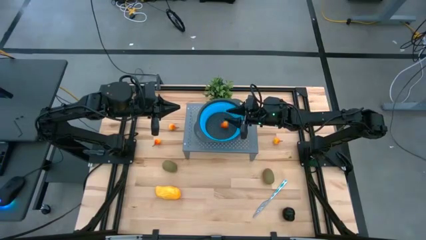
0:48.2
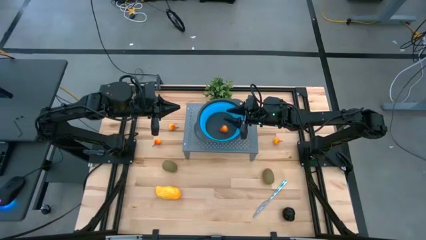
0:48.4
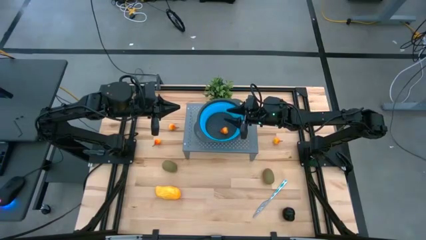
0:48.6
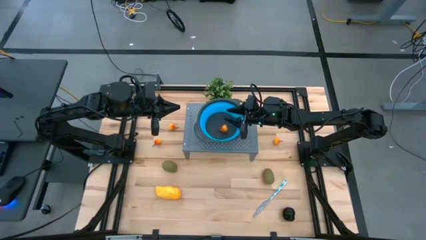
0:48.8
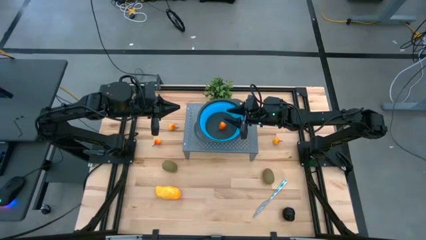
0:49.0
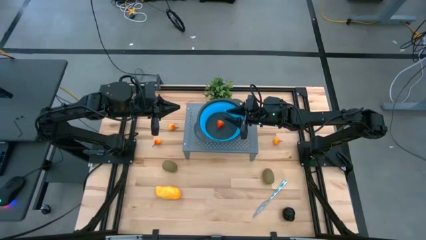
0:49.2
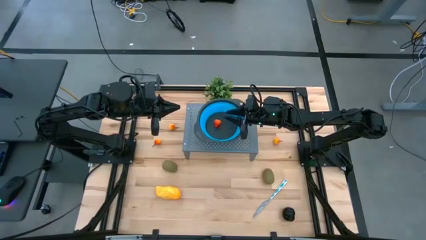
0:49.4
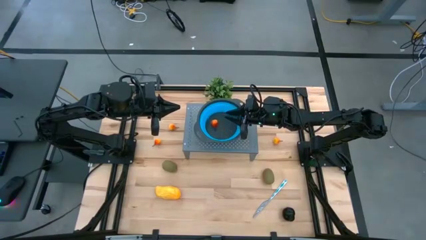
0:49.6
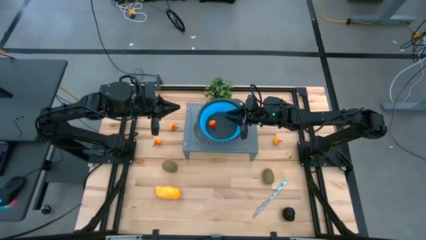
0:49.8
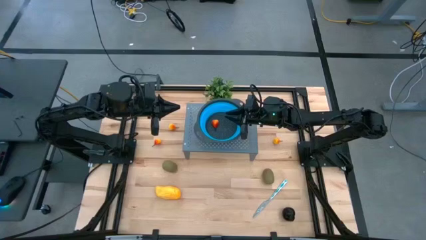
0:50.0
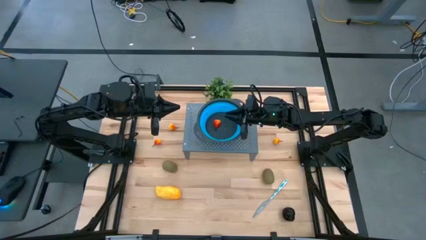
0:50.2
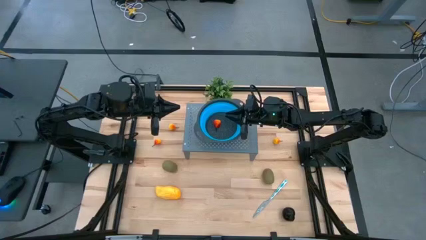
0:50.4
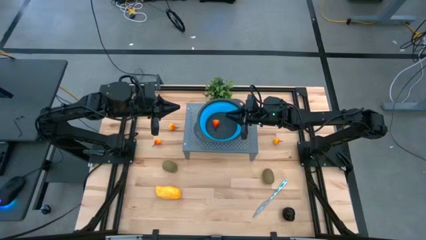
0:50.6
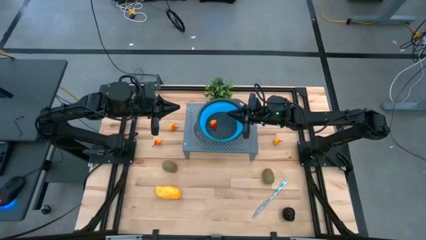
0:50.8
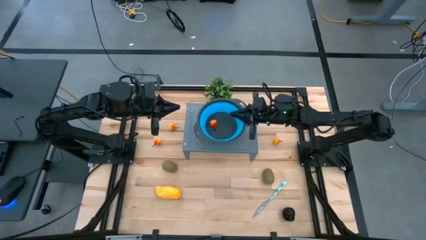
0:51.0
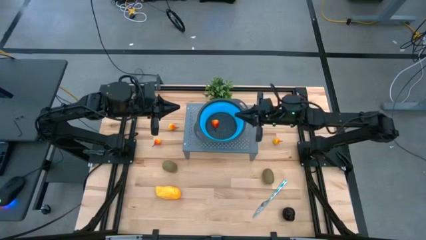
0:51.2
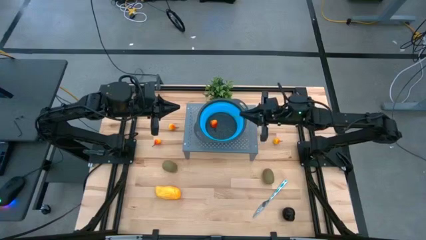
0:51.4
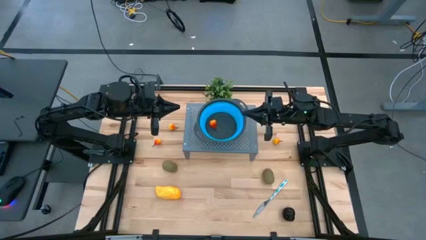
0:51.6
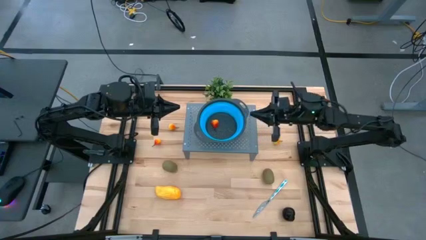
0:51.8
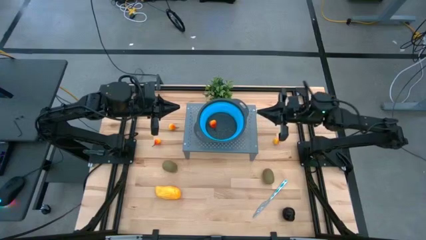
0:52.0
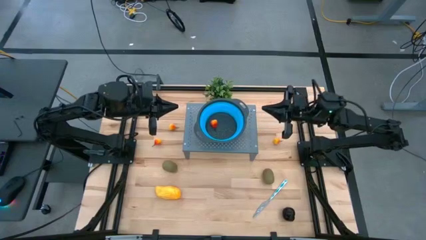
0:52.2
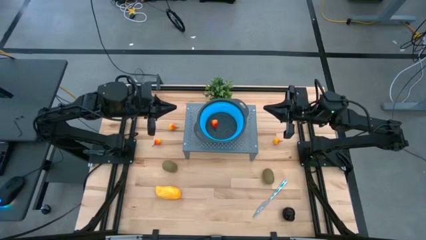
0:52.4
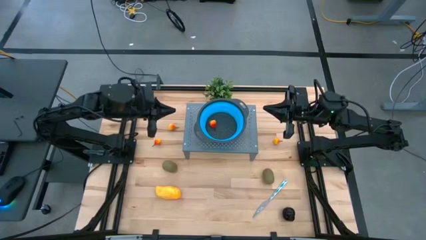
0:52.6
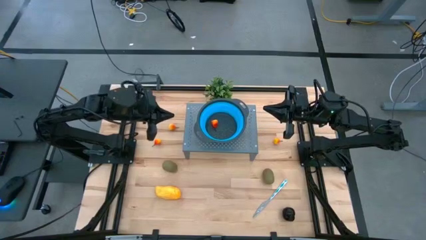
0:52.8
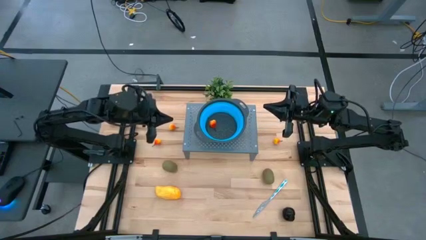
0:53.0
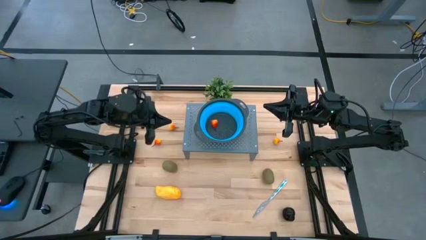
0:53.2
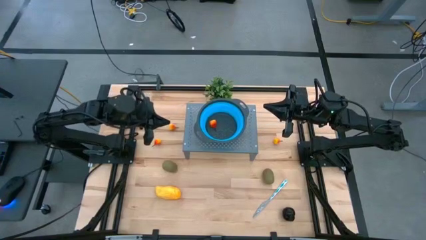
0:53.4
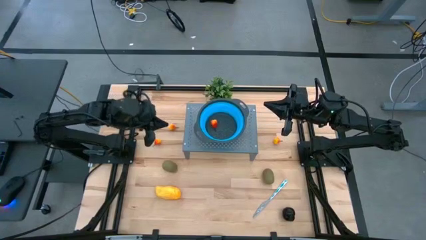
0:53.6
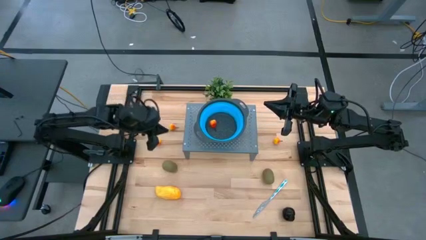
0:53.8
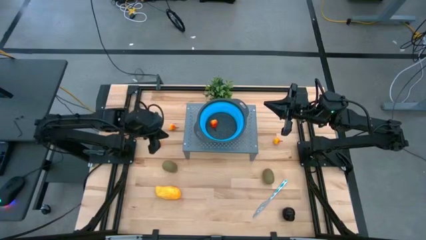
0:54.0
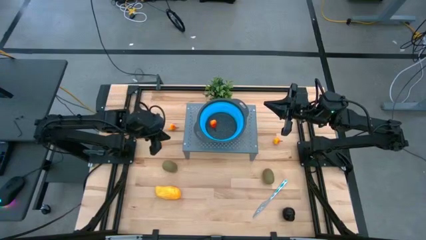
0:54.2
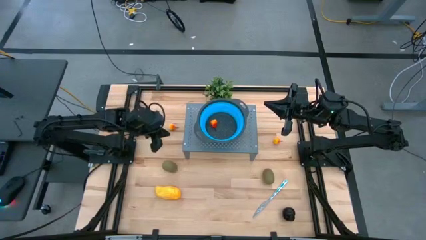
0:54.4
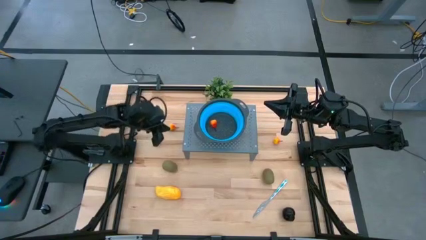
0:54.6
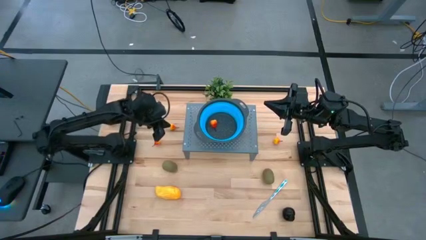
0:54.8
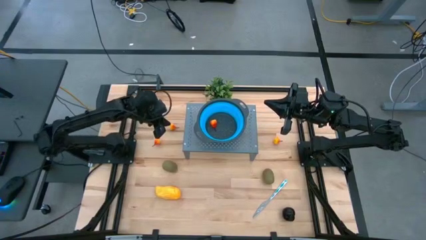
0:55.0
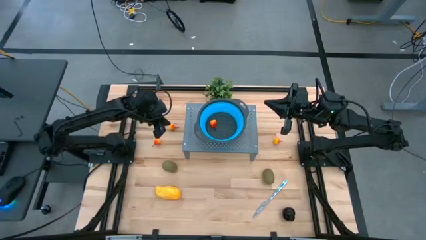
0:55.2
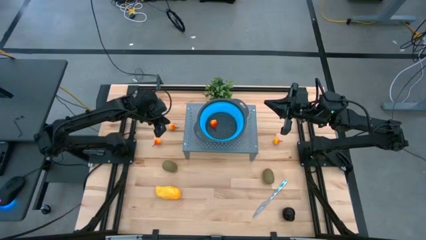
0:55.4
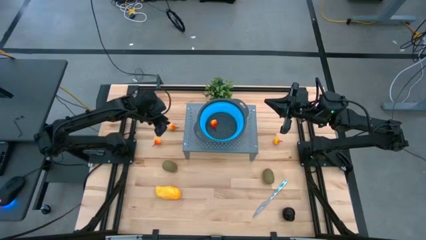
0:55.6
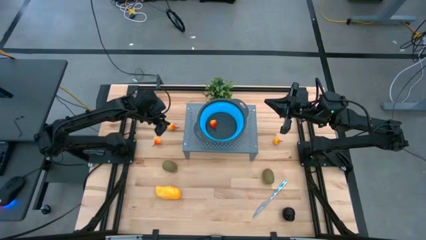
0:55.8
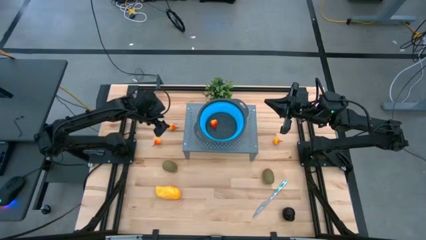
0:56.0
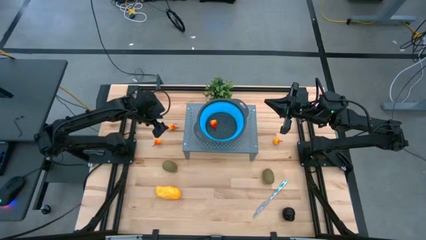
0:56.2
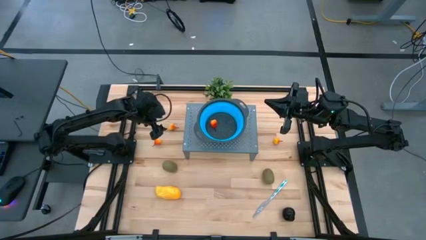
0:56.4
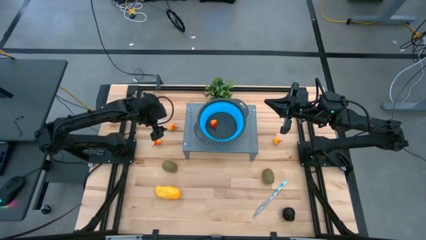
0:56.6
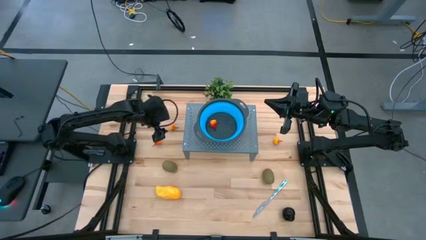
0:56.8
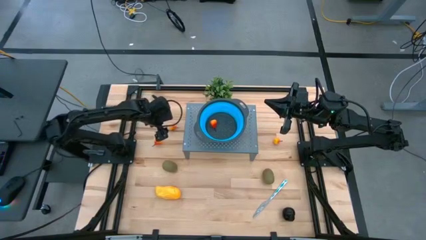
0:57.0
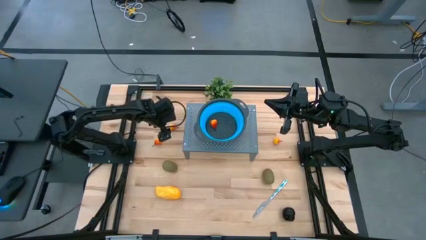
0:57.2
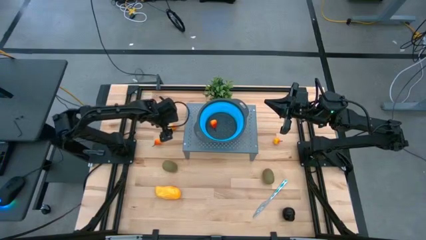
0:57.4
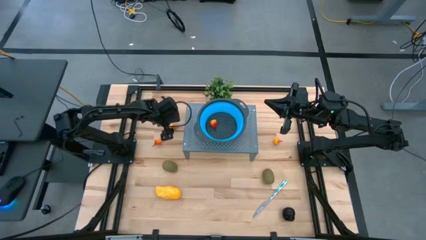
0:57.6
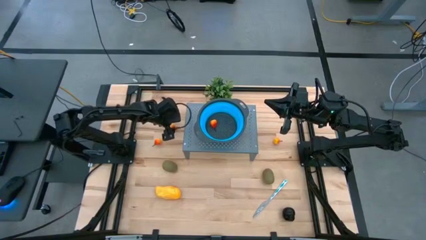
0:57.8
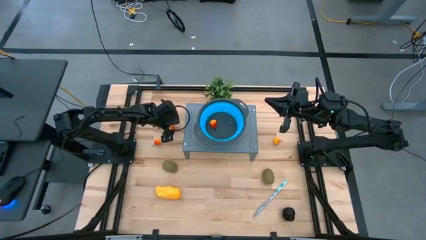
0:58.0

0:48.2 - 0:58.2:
Task: Pick & Place Fruit
Put the top left orange pear into the strainer bowl on the shelf

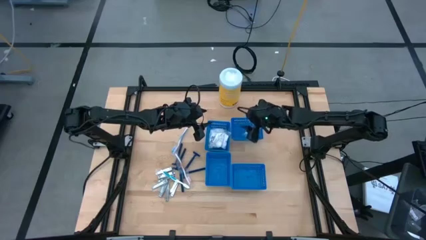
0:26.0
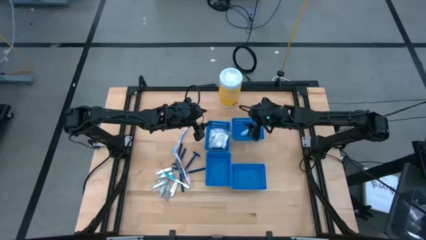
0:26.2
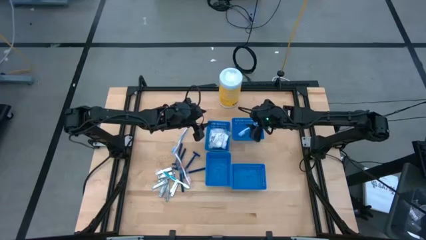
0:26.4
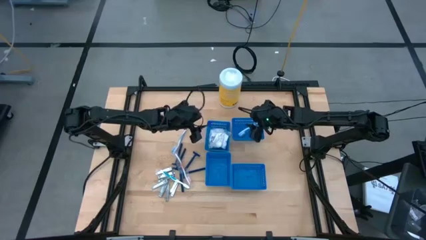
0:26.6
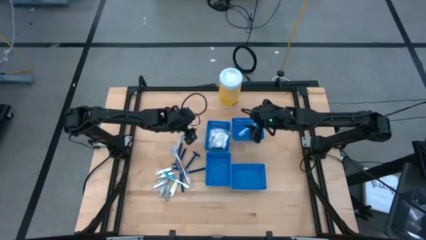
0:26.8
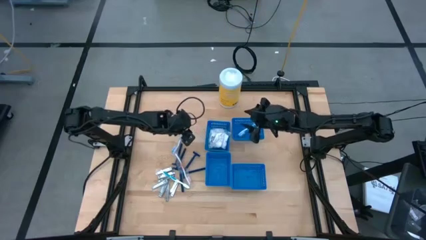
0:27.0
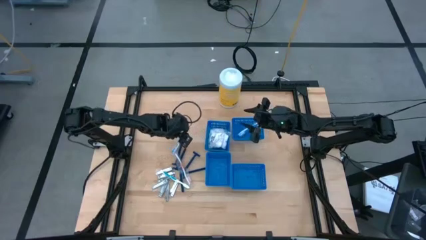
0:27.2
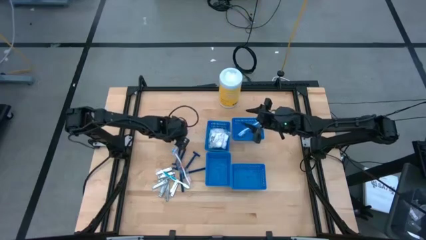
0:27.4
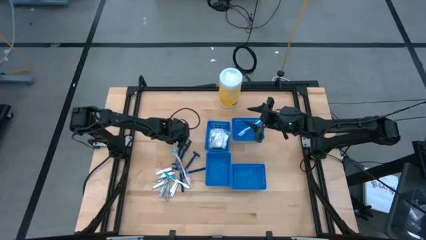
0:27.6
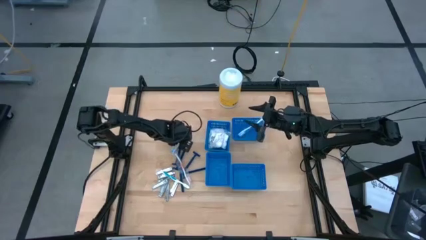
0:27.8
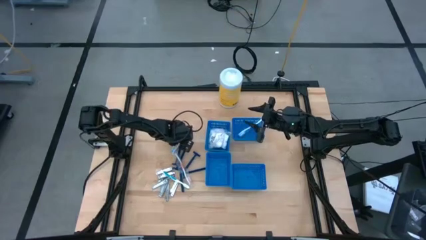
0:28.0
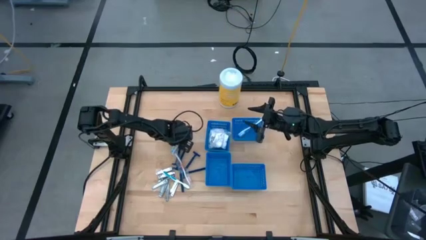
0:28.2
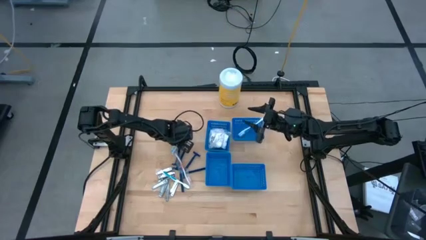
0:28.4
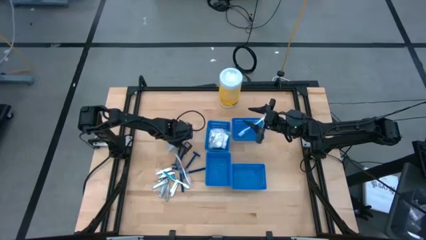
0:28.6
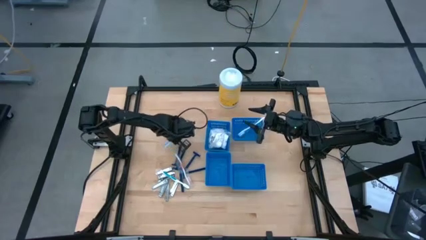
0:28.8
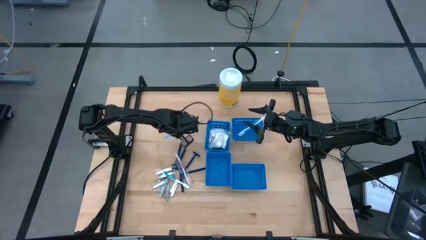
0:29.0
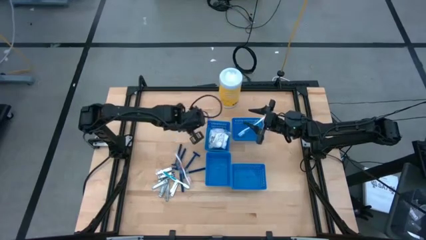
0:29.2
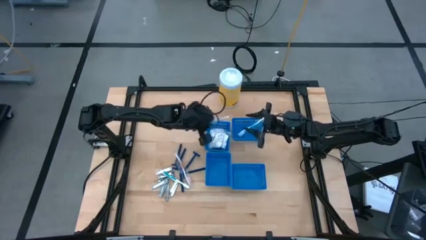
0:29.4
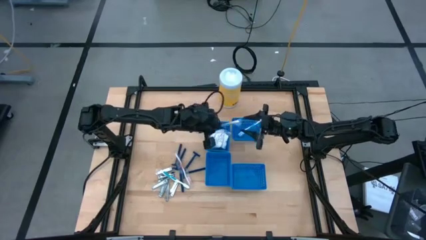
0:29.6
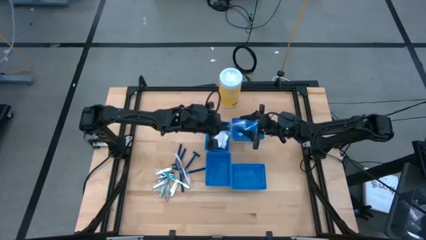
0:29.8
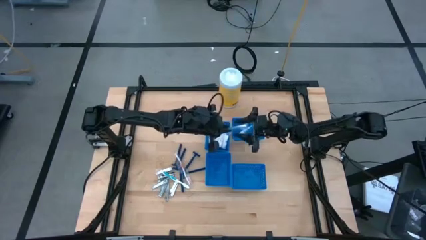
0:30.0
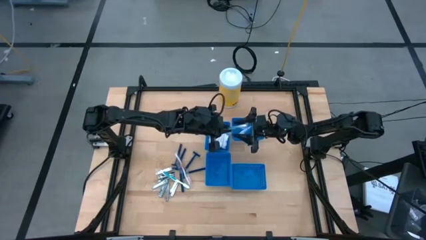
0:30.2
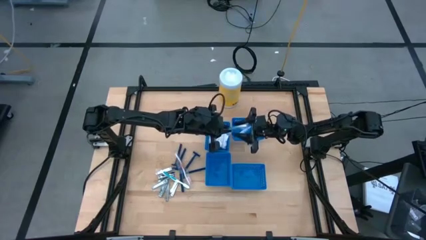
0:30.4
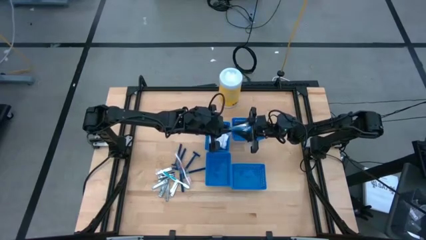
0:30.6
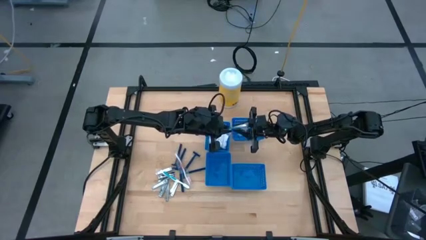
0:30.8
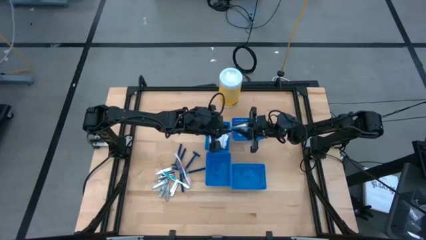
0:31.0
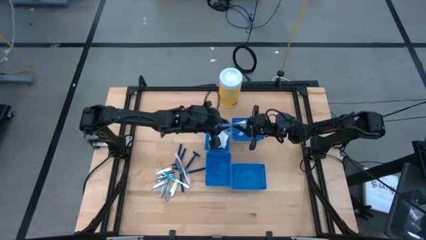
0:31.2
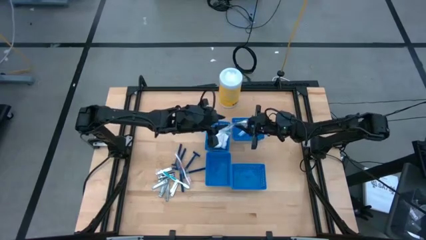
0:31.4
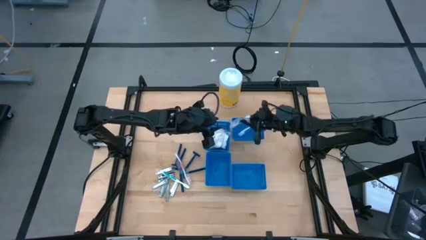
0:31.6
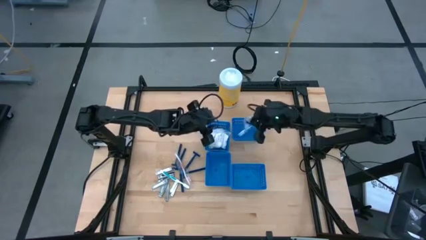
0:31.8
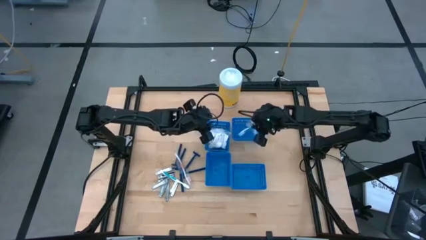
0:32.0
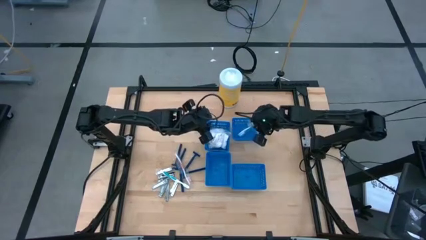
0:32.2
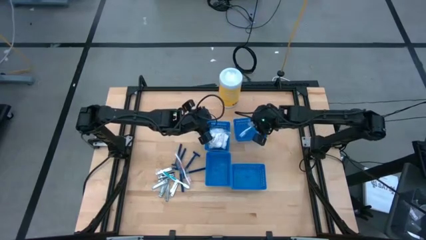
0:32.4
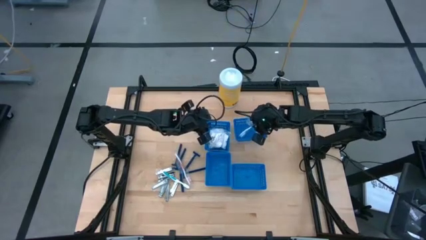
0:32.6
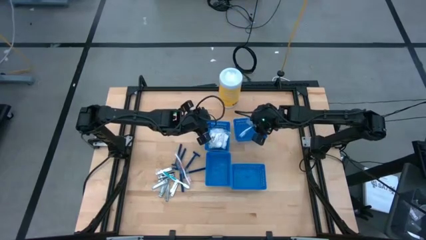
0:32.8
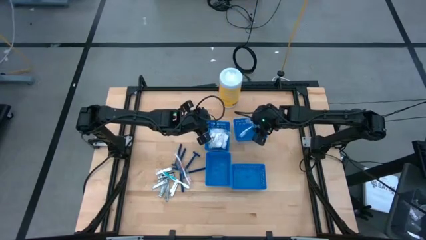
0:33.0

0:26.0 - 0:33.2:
Task: Pick & Place Travel size toiletries
Put the blue toothbrush into the top right blue bin
